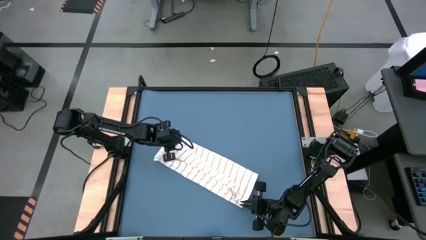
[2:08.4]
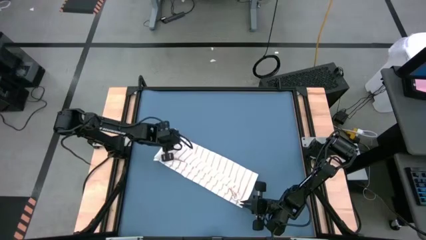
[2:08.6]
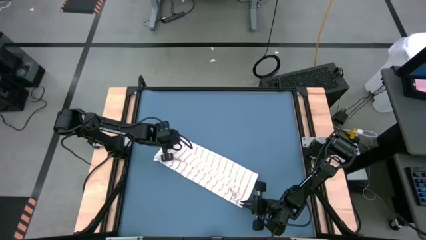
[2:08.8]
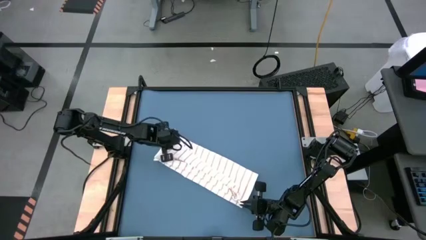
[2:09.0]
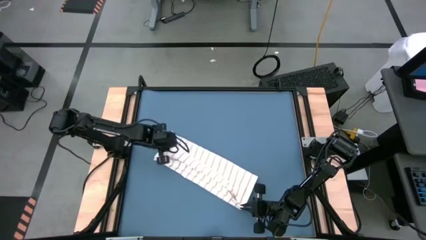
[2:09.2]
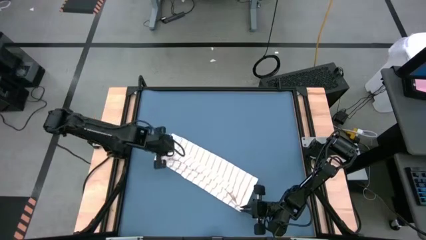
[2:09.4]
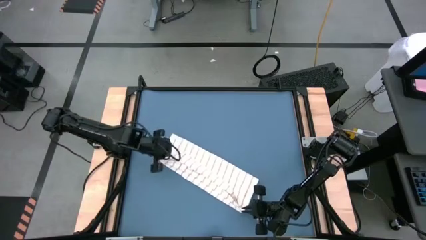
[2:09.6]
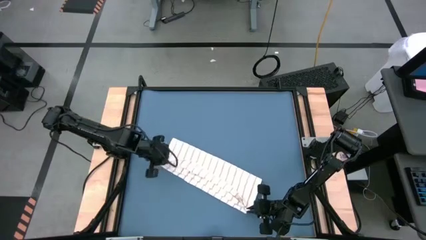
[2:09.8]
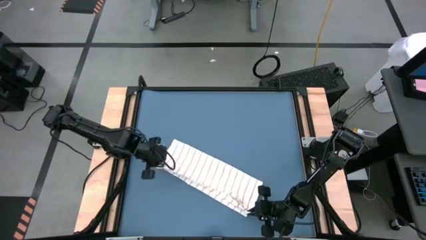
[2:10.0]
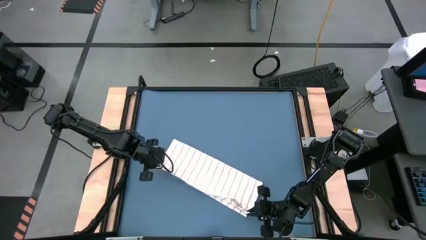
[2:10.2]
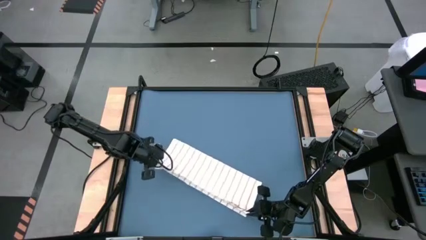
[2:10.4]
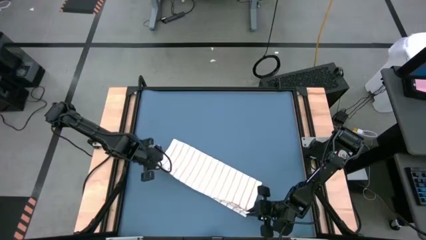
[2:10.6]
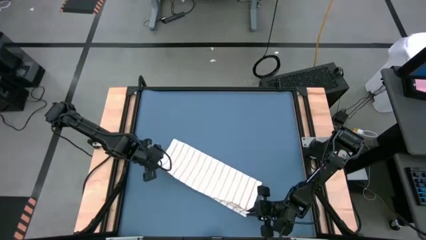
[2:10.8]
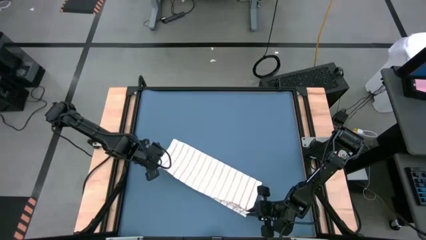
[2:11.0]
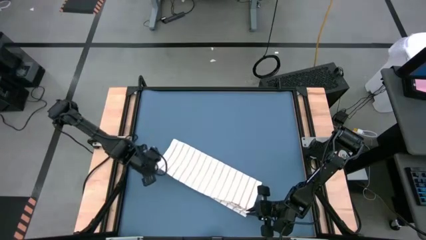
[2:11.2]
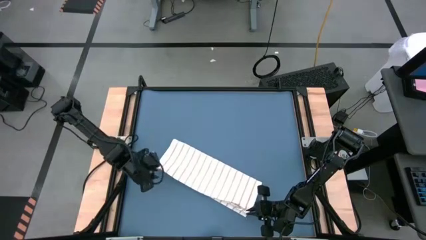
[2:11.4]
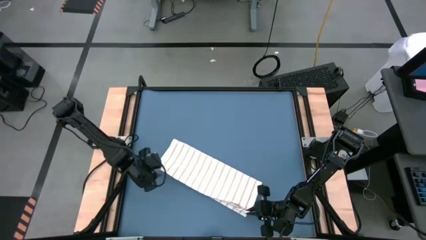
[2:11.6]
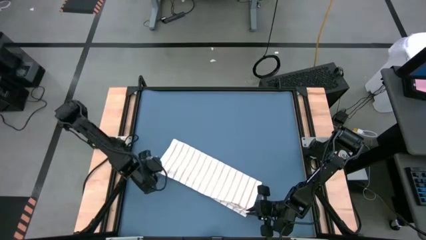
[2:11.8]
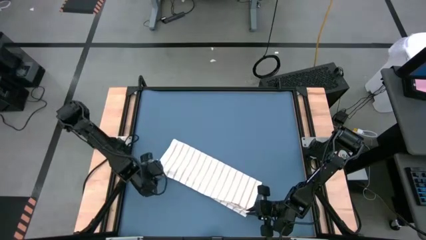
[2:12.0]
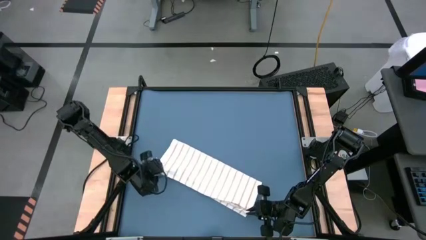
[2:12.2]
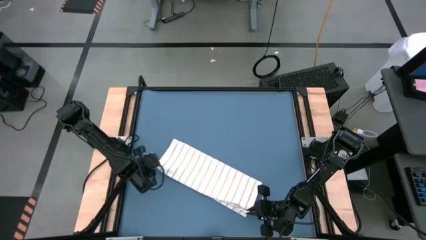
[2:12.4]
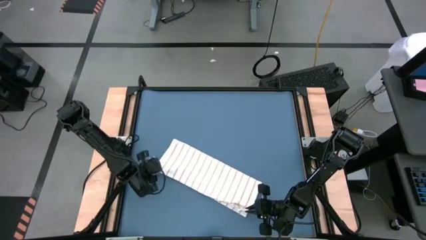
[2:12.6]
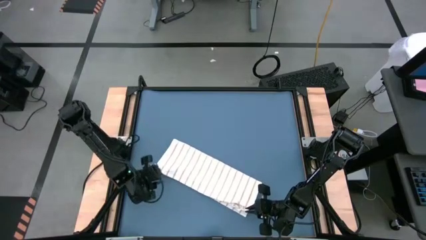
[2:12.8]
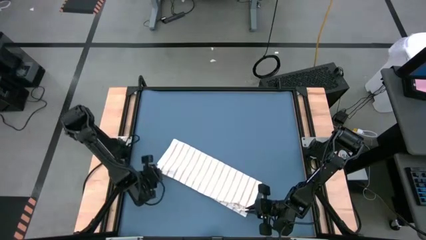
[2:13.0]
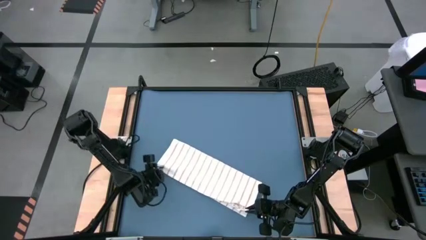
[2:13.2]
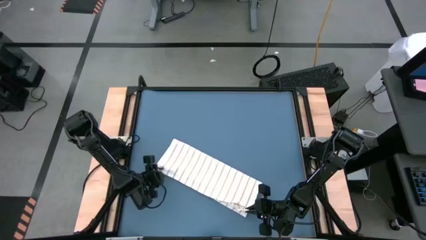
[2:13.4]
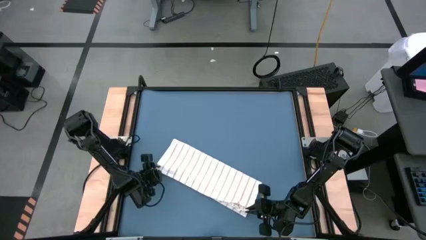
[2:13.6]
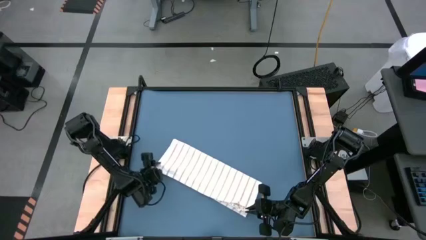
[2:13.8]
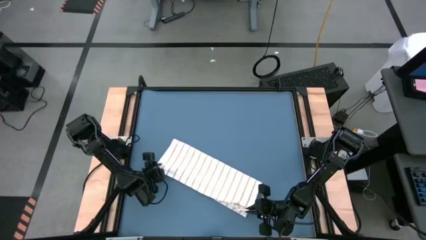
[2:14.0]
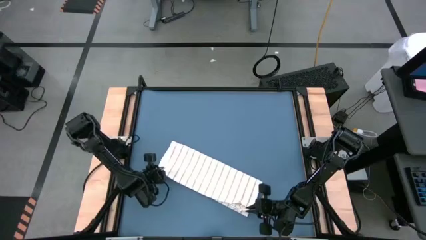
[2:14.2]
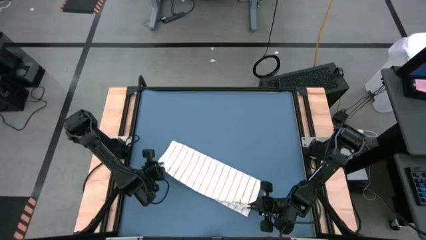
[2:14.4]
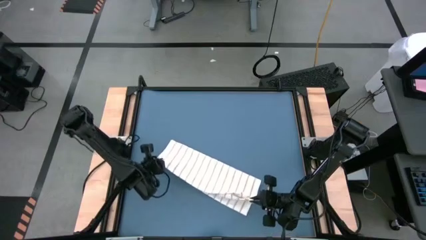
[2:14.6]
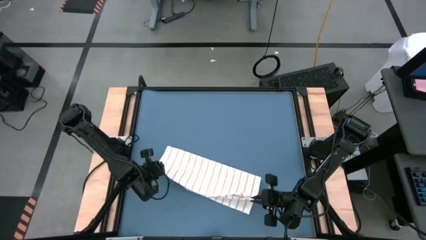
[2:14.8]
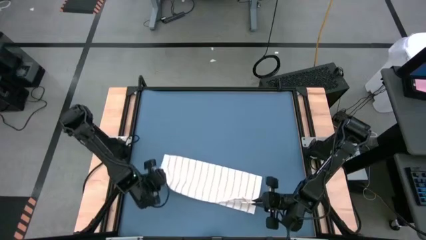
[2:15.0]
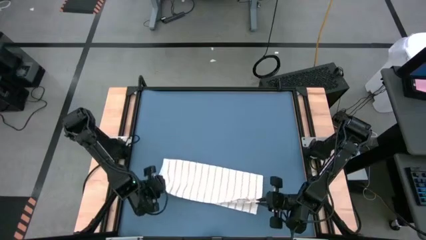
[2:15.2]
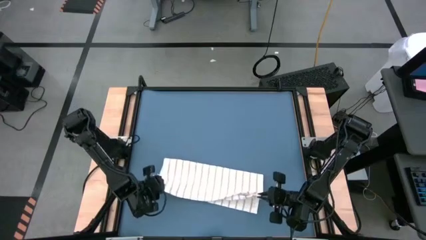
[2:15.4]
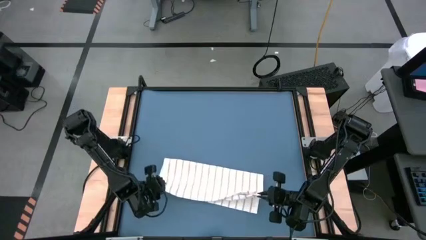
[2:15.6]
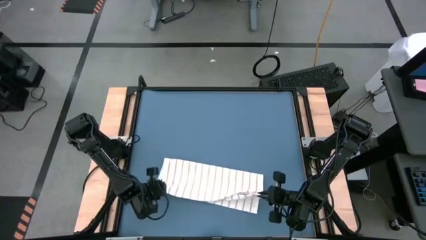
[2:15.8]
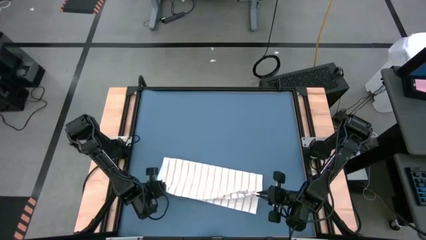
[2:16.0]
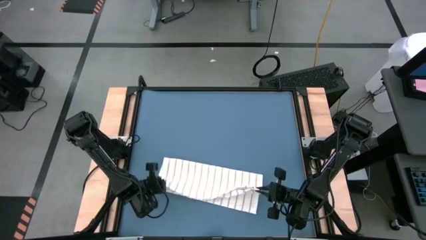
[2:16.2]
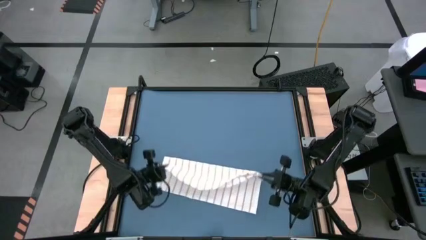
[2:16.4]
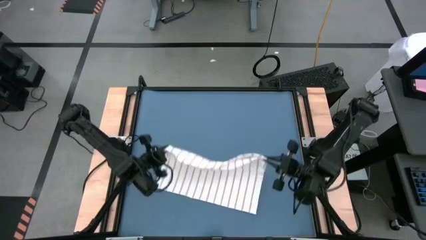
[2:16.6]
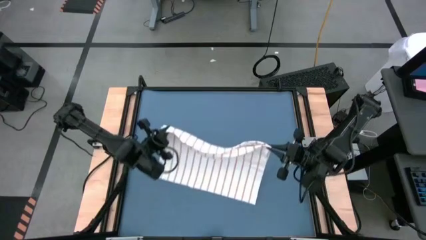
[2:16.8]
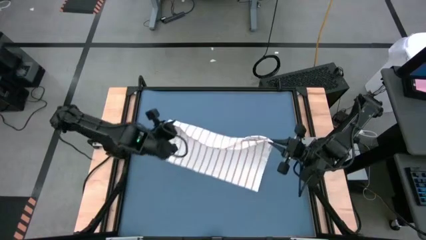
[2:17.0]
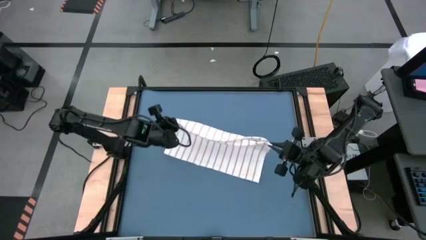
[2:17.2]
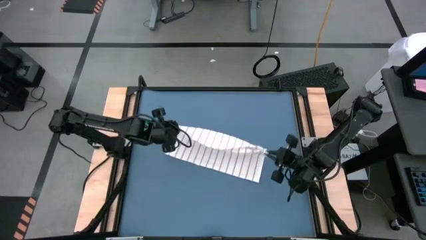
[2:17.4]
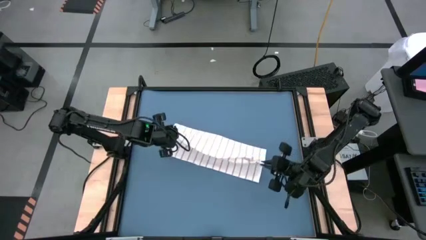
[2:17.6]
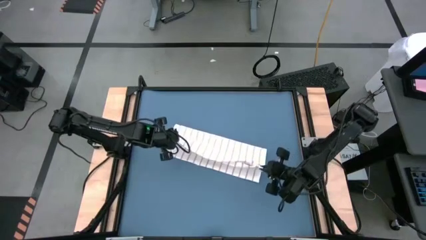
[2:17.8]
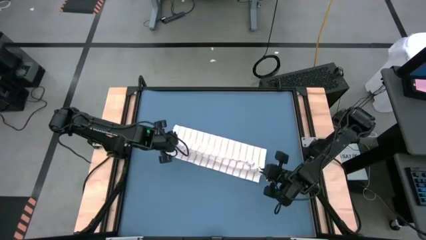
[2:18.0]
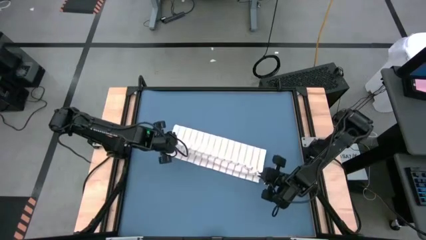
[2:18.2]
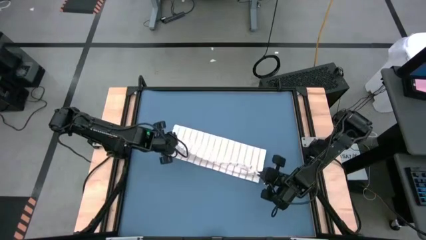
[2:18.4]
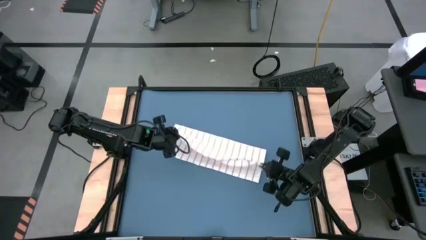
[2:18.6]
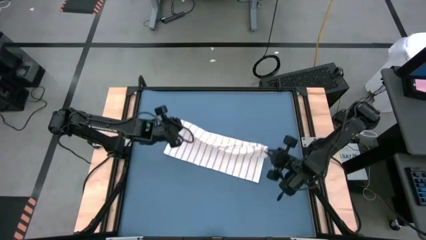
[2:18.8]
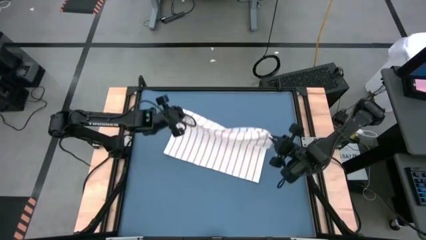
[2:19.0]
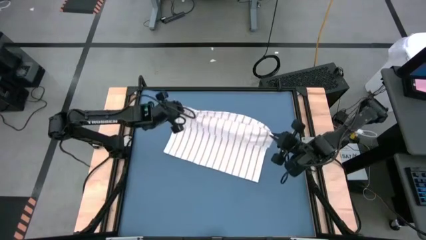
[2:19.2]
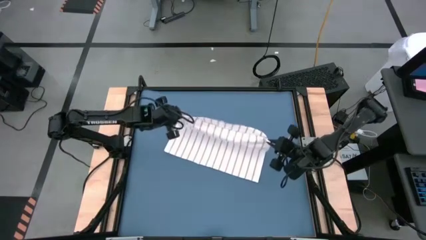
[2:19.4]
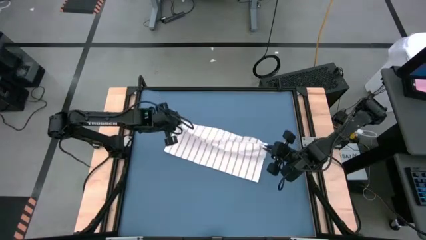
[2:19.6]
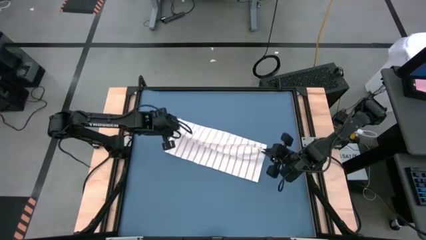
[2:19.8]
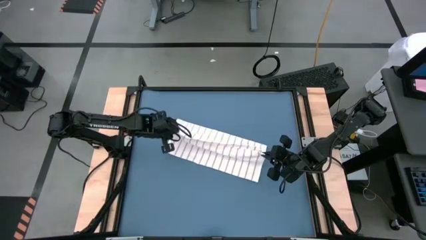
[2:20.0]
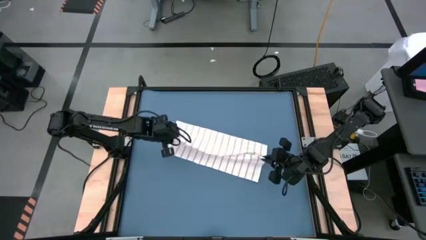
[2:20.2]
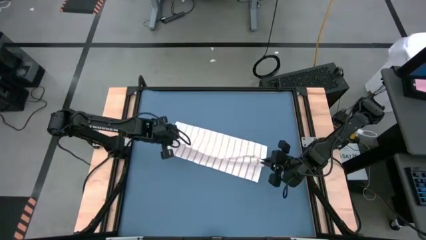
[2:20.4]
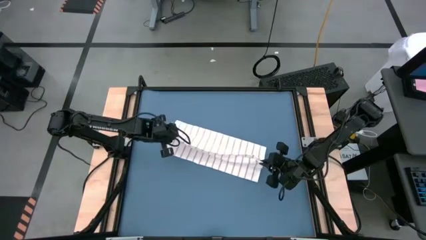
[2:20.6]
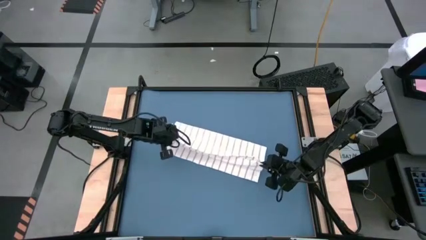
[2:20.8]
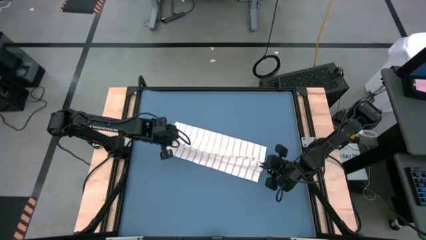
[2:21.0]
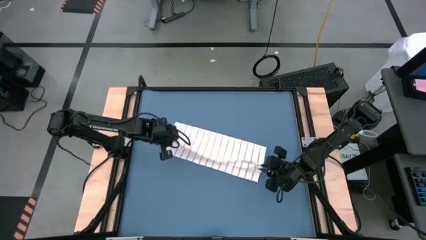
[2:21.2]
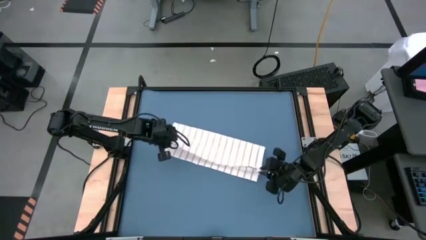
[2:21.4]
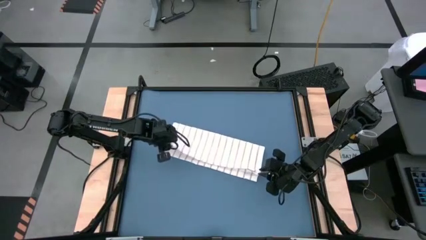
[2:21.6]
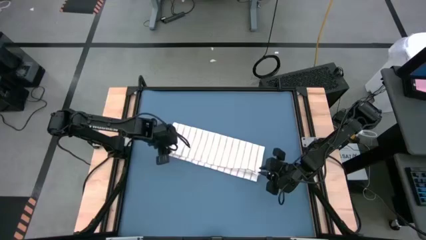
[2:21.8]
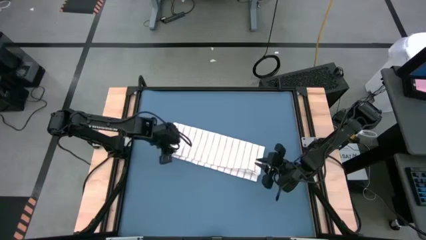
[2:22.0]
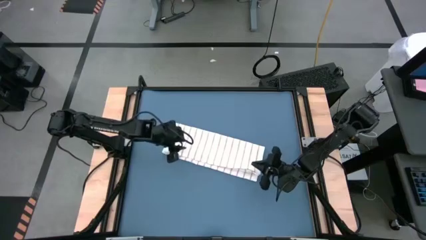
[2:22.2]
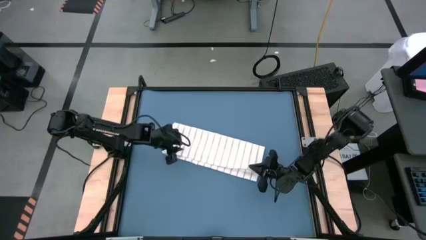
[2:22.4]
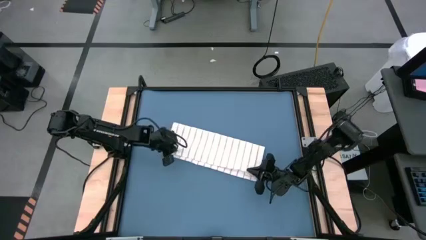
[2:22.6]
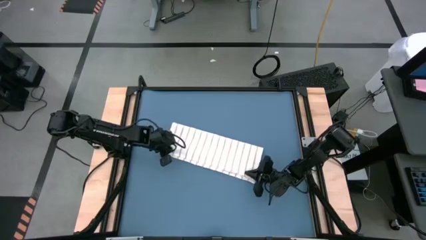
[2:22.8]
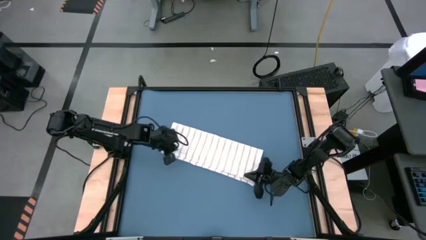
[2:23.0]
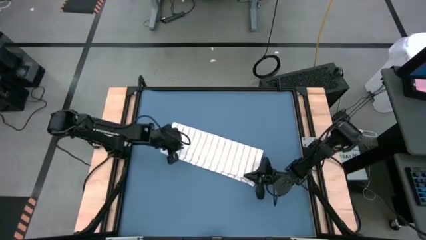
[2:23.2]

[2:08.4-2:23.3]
Task: Roll towel
Fold the white towel

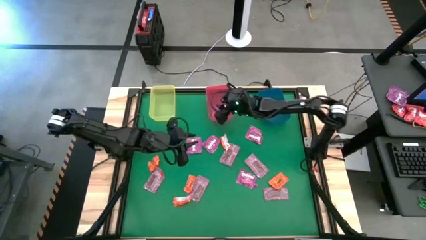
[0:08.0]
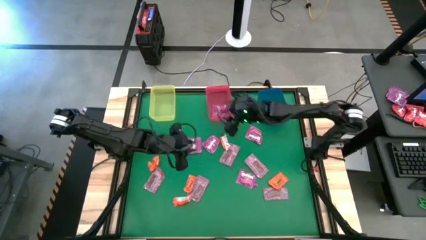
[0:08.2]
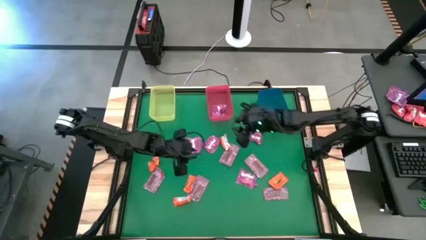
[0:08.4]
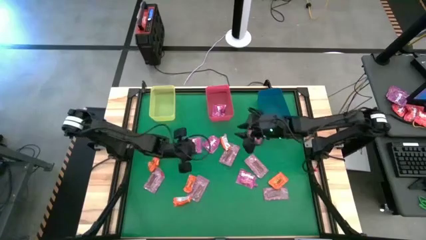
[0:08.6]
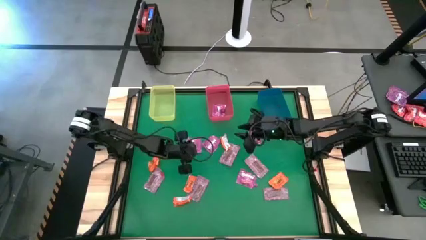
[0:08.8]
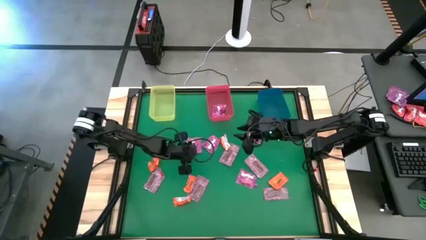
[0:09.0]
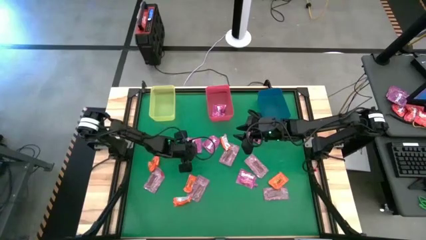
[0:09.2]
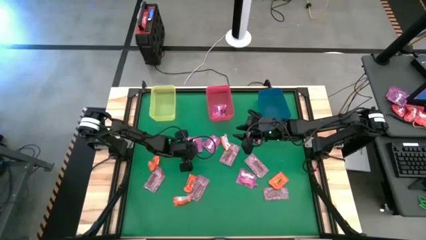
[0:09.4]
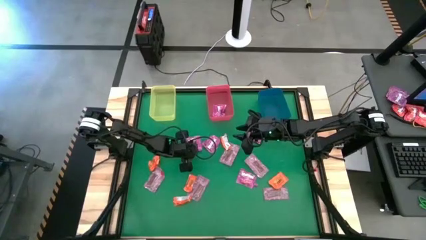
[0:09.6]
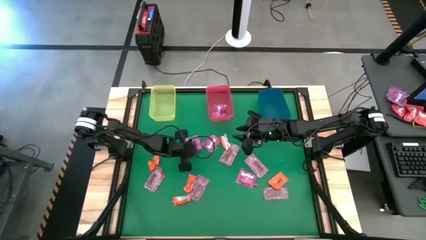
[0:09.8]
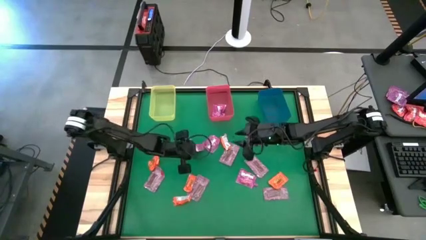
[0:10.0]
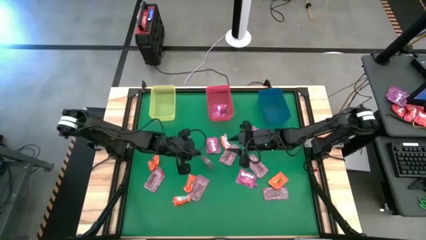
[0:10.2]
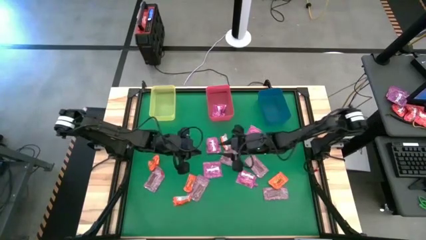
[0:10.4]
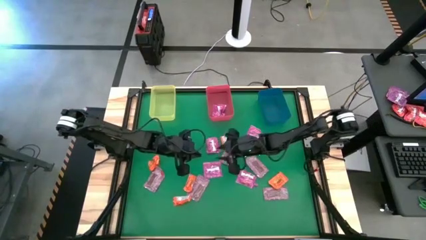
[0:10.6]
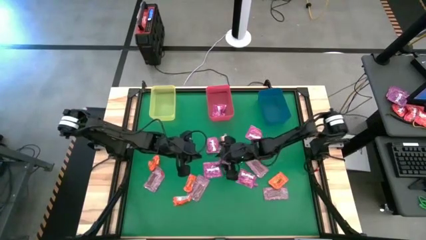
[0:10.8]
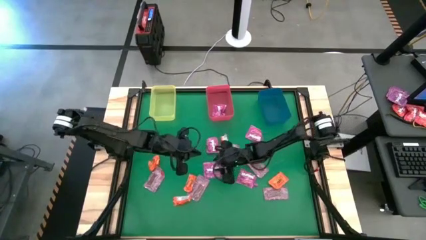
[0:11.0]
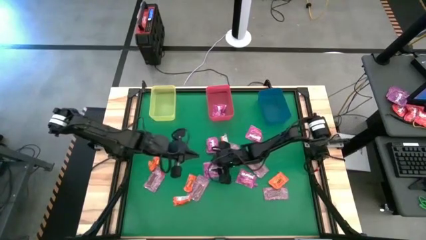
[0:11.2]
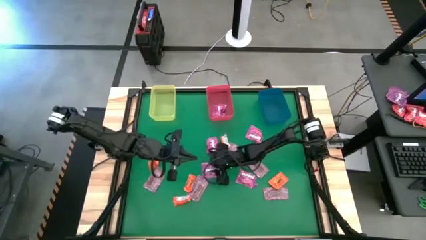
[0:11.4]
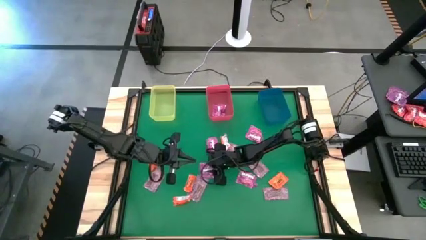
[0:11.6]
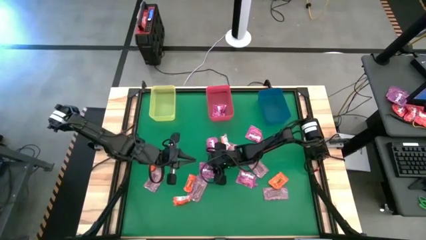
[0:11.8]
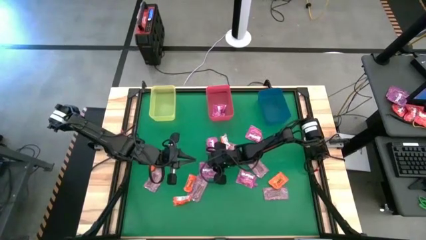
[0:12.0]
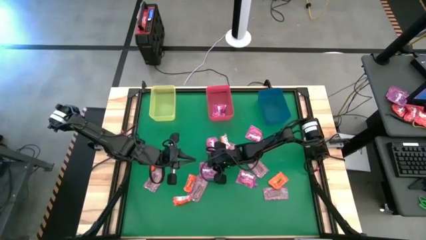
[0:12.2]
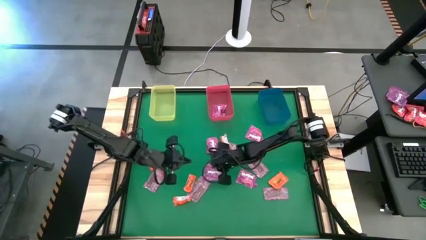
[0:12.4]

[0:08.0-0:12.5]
Task: Sort candy by brand, put in halloween buckets
Put the violet candy into the pink bin
